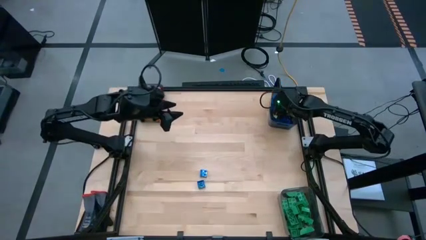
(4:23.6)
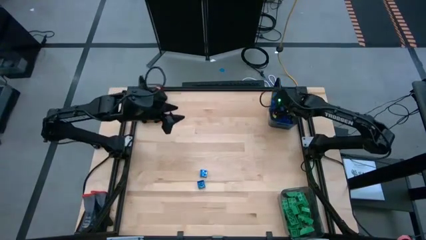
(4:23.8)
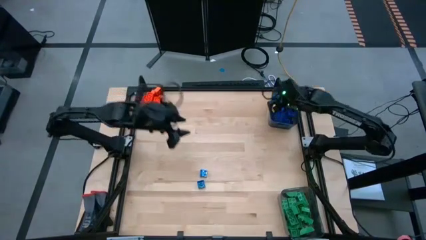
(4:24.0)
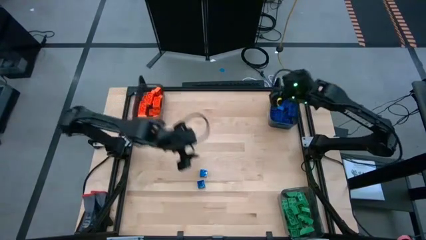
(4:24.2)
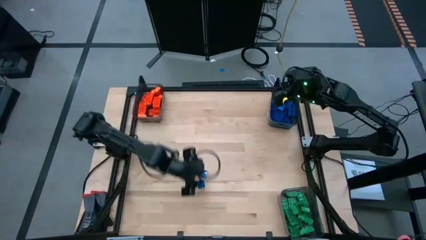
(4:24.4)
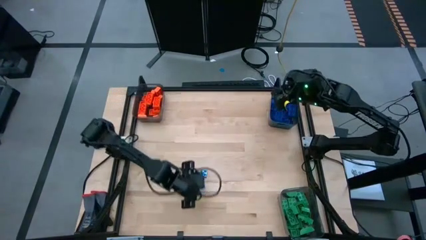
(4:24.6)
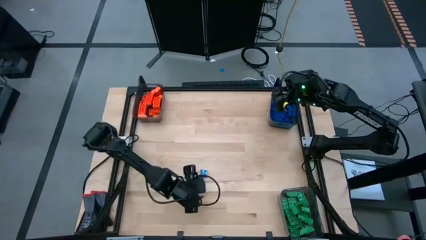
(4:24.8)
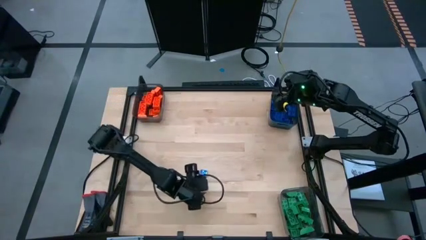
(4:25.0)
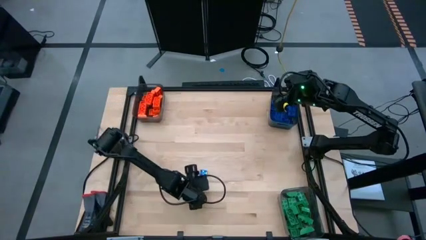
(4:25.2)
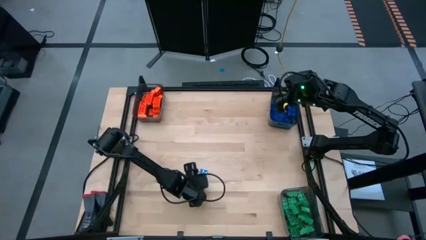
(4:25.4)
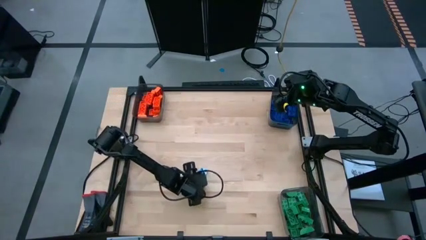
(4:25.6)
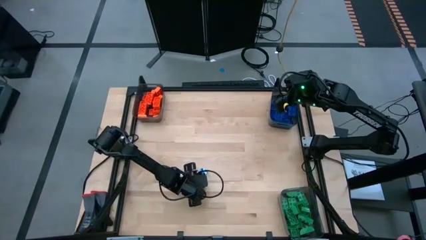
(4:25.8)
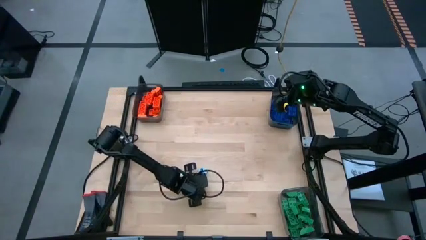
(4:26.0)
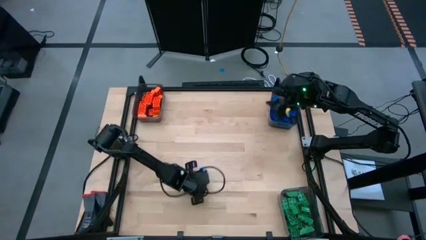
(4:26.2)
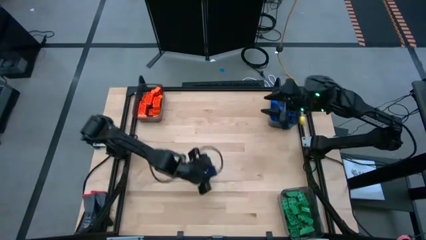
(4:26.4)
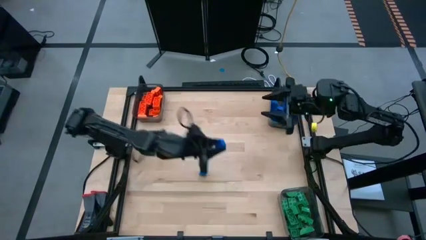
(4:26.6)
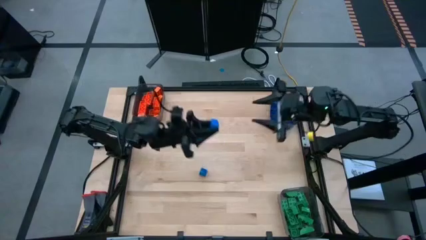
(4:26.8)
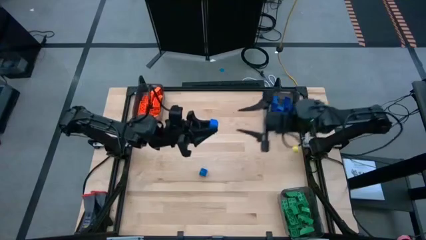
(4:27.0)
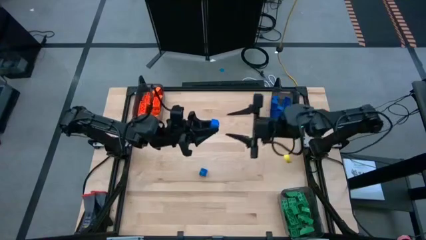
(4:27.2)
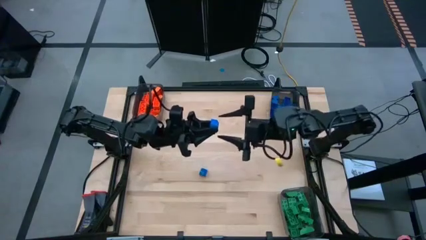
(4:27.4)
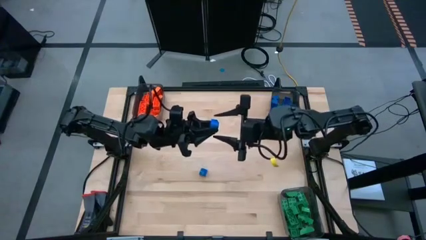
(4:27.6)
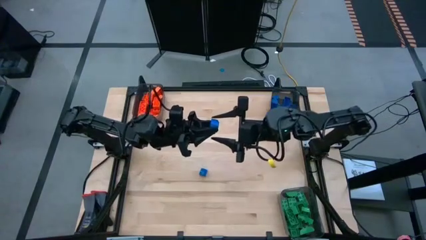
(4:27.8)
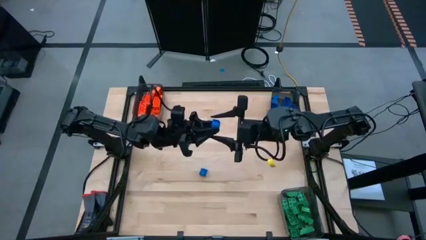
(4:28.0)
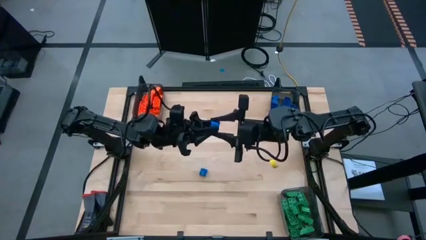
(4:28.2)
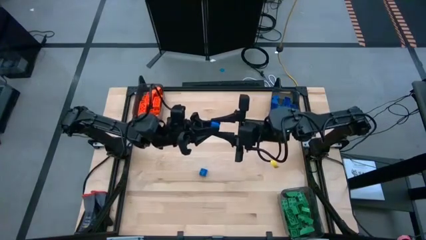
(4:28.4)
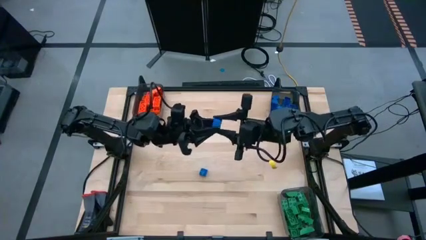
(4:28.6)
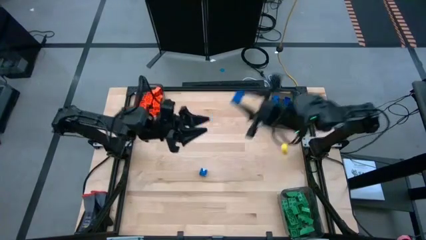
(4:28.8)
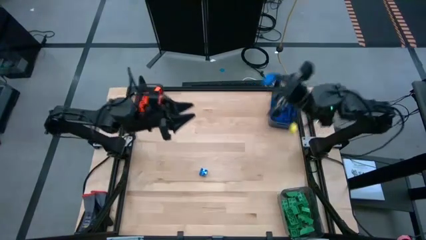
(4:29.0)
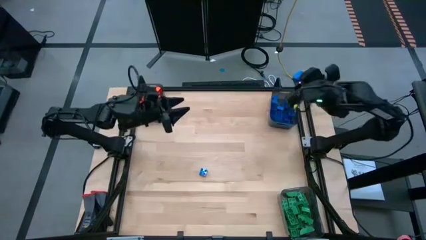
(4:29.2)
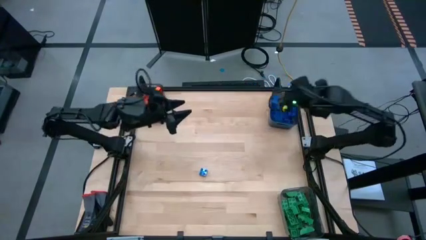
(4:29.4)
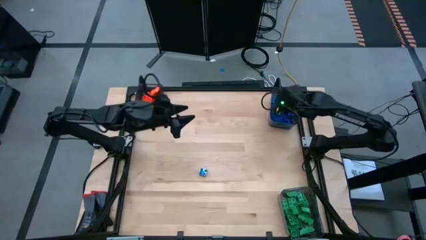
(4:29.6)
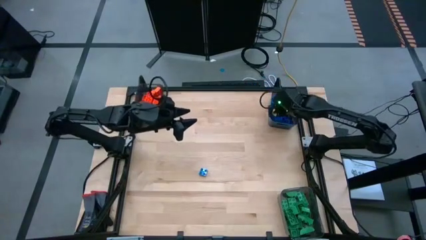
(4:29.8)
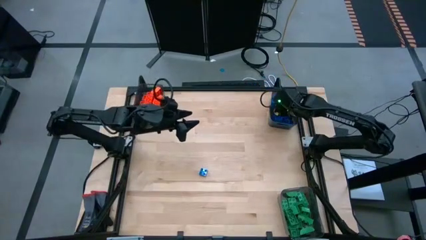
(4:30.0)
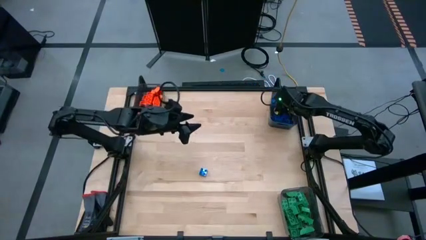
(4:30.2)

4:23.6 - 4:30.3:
Task: Sort blocks
Put the blue game piece into the top right black bin

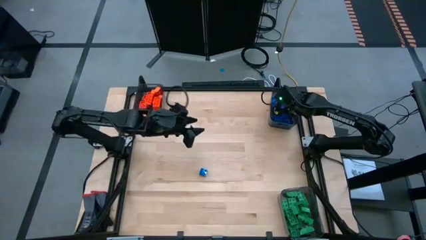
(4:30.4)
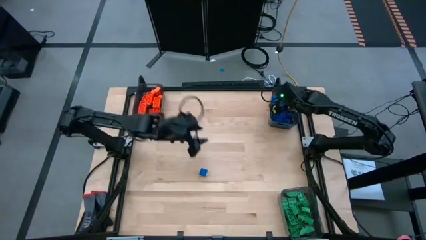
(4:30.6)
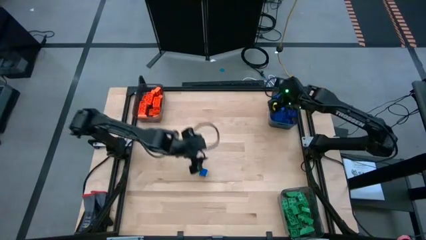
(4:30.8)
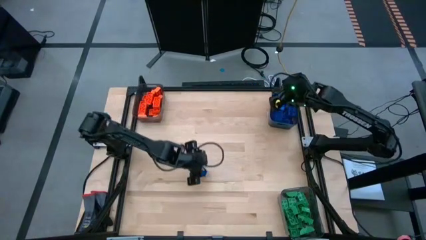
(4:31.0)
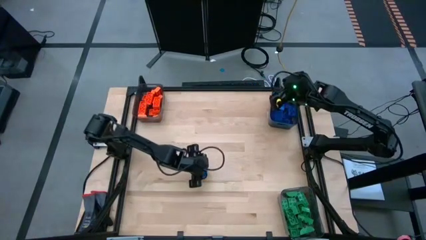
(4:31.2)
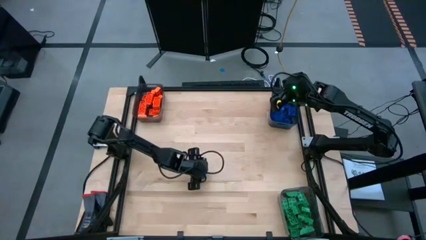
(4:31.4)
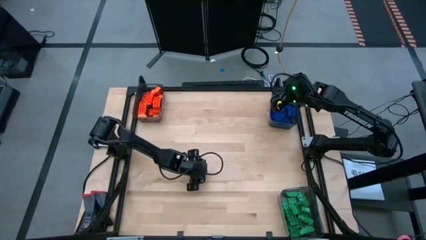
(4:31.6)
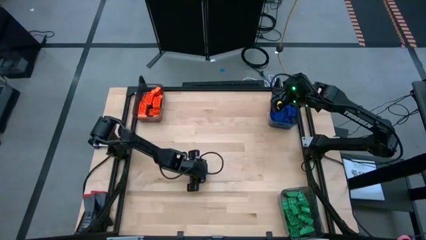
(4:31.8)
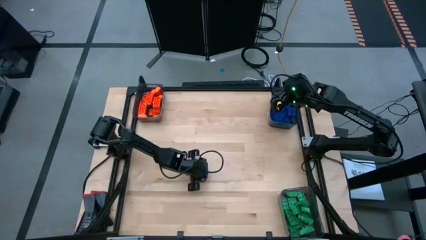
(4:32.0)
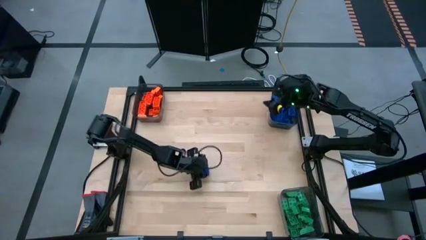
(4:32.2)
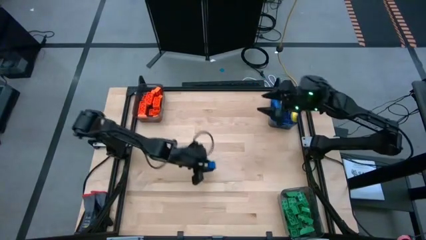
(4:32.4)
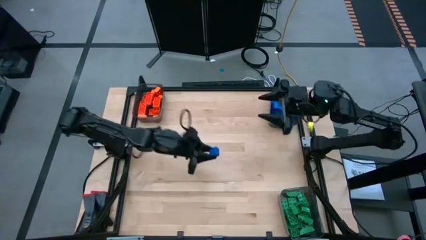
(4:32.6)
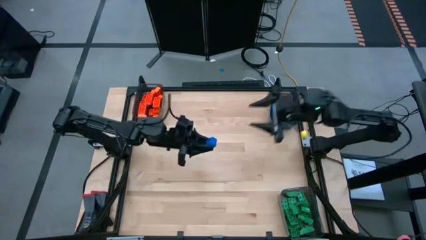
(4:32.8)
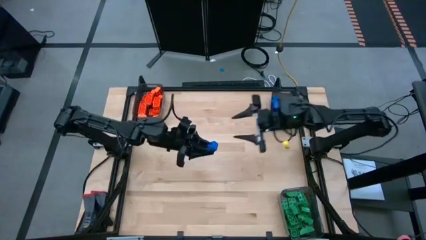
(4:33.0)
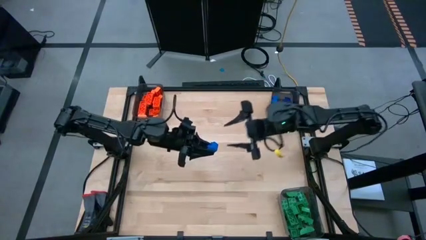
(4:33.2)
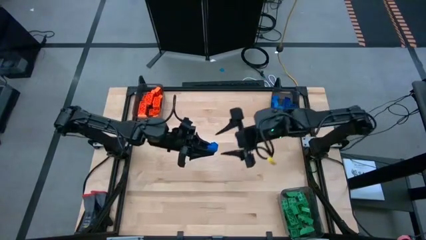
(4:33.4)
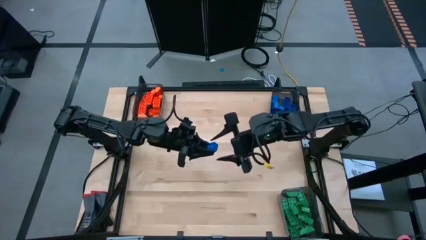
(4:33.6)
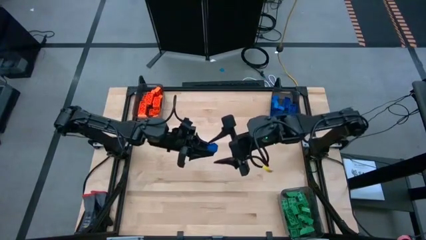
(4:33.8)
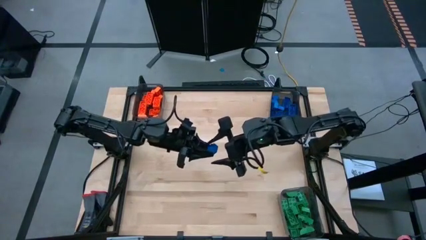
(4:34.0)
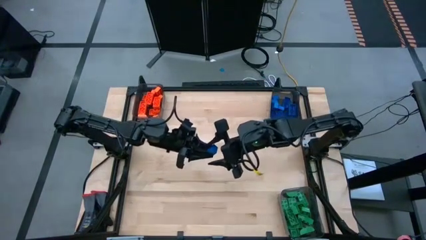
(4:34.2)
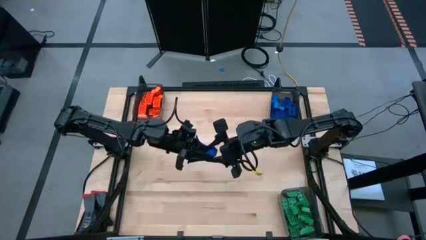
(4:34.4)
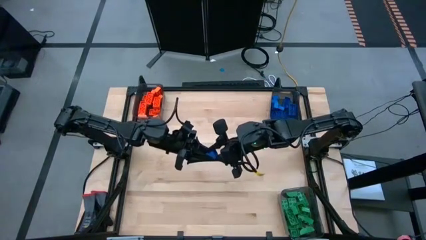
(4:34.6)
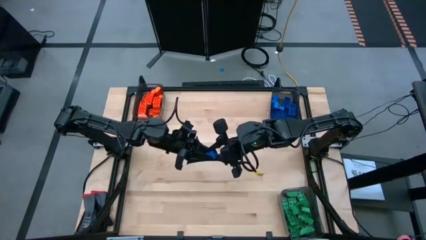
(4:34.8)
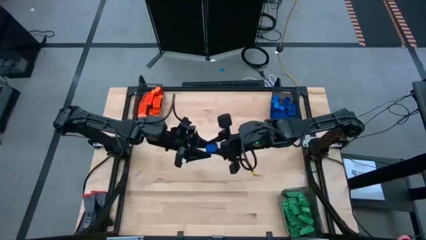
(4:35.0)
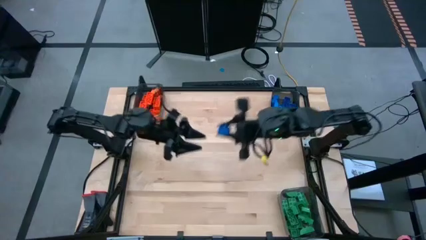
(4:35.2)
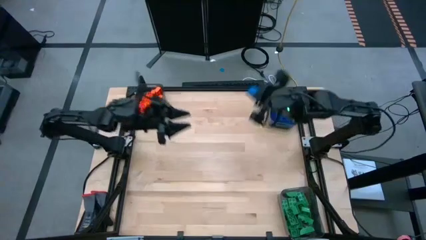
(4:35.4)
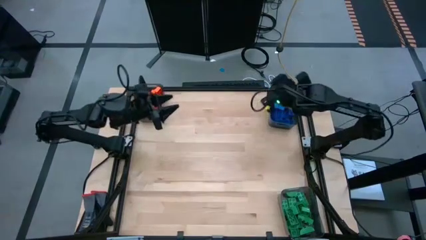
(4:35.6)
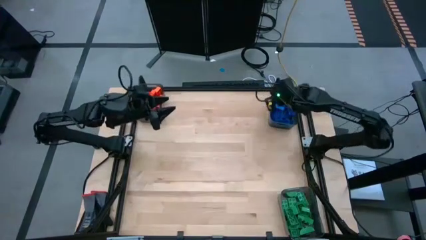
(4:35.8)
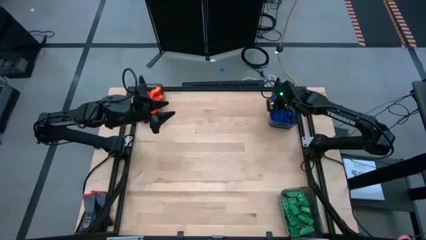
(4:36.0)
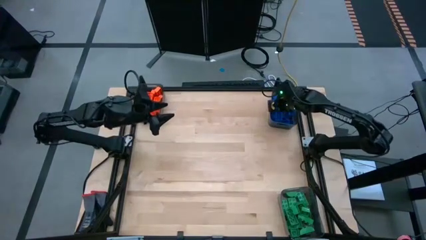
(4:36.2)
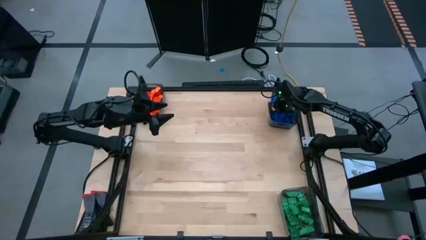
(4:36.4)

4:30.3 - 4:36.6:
Put the blue game piece into the top right black bin

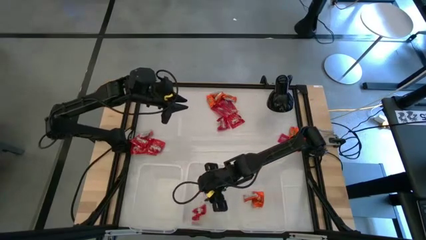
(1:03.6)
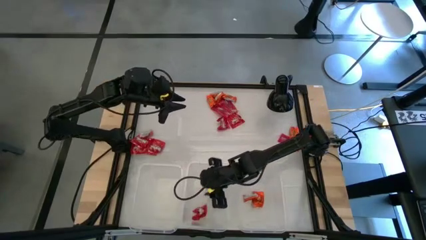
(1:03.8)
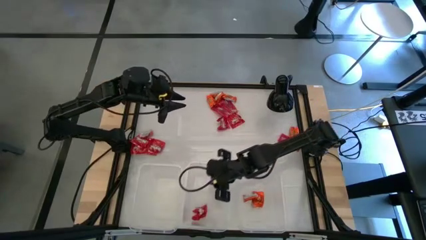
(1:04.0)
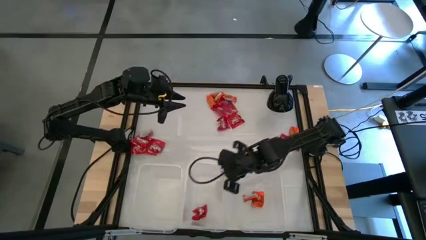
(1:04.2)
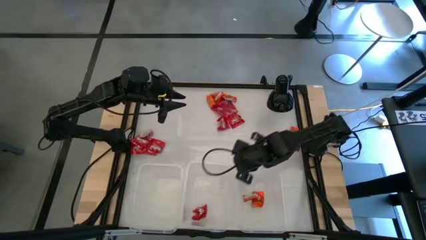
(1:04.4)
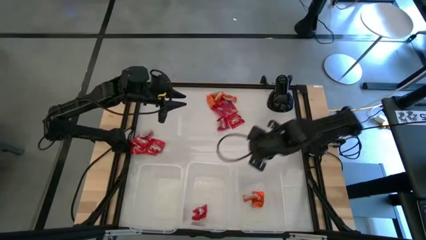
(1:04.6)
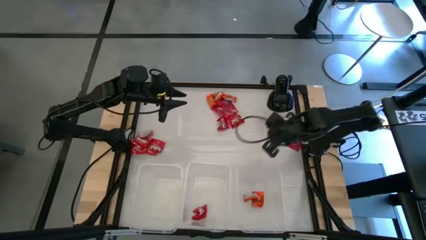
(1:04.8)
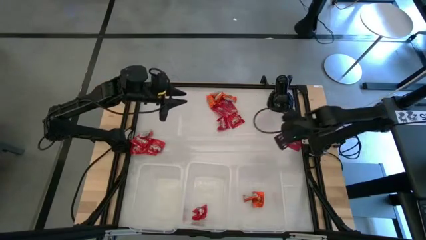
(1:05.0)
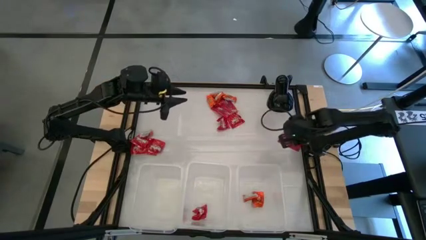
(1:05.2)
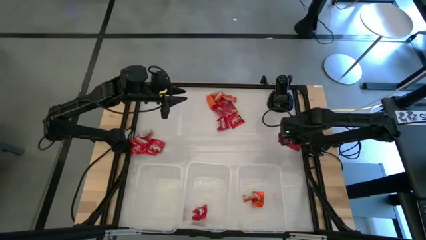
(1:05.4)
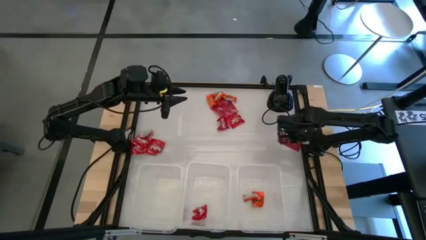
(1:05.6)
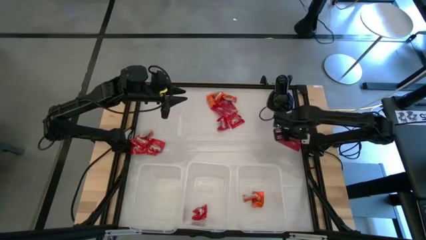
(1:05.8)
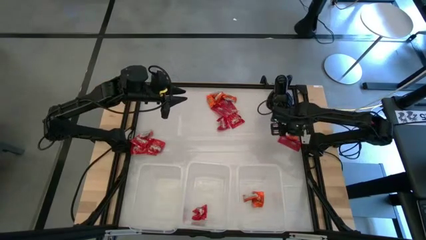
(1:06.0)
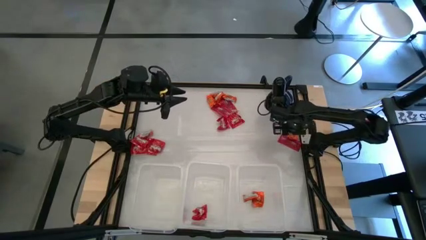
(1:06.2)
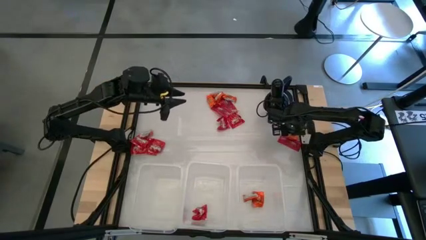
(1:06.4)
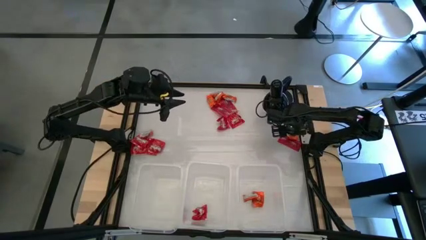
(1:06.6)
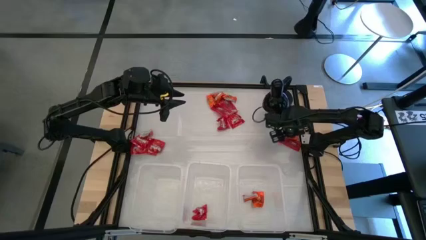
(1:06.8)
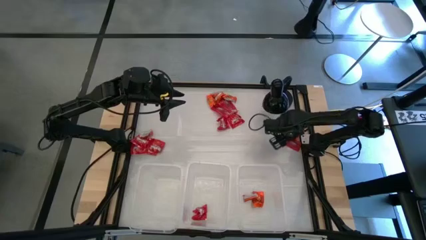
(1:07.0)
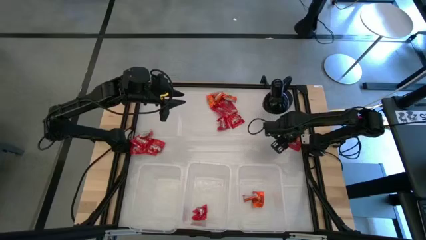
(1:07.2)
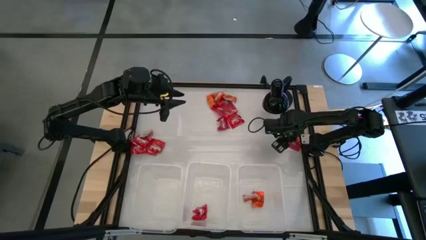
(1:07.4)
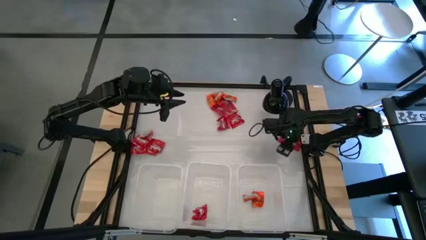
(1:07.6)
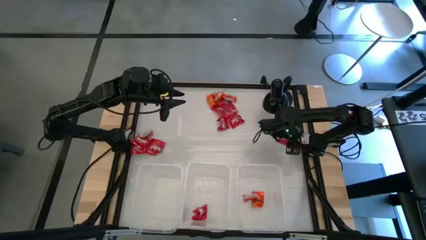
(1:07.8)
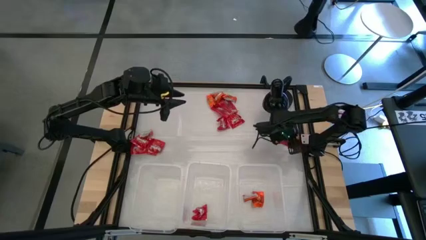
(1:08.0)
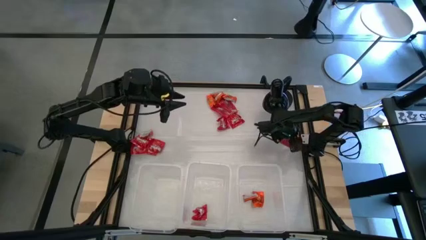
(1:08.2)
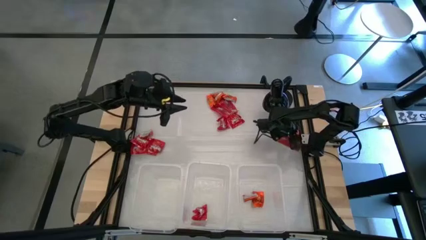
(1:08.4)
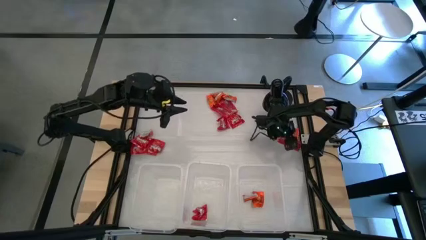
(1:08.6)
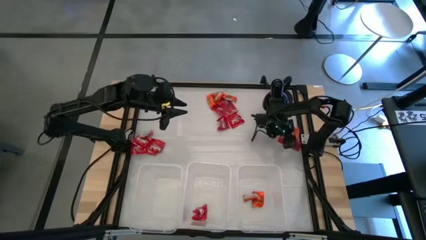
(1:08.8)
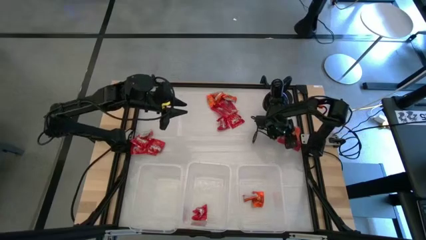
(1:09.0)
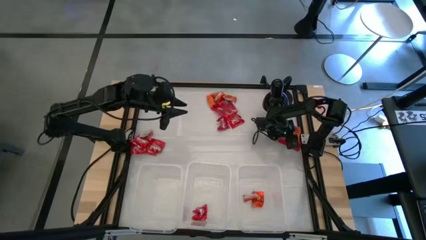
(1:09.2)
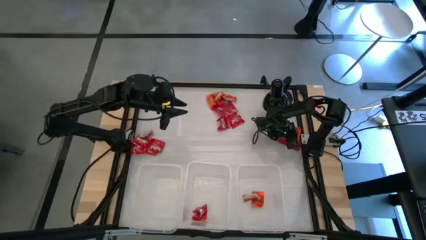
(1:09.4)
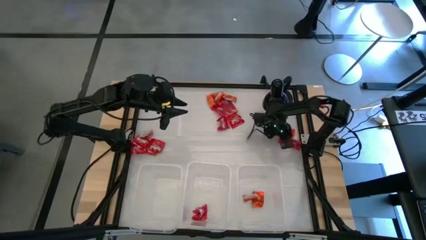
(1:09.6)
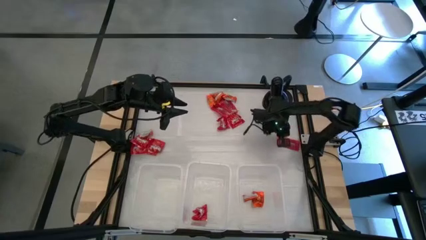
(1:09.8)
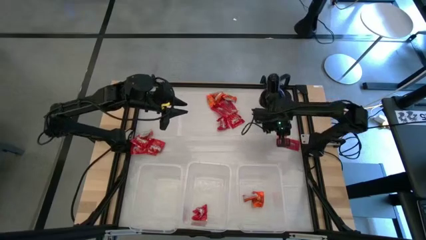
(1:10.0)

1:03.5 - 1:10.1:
Task: Sort candy
Put the orange candy into the right transparent bin
